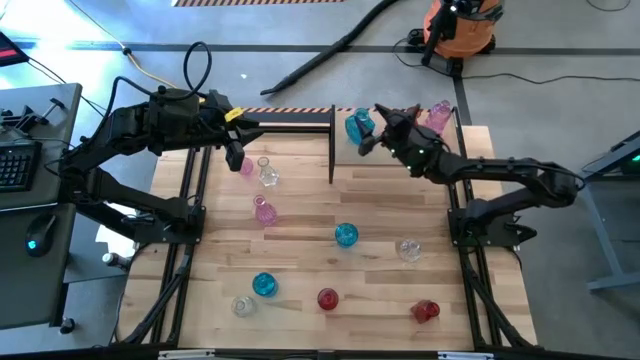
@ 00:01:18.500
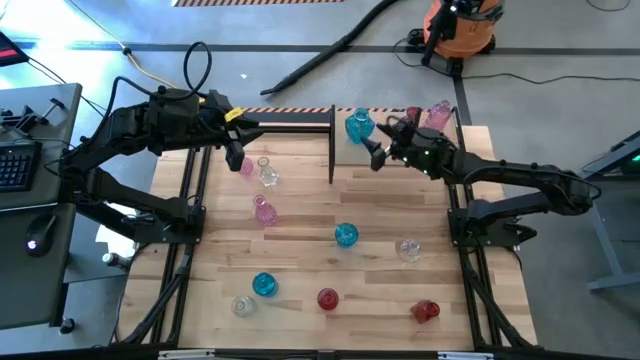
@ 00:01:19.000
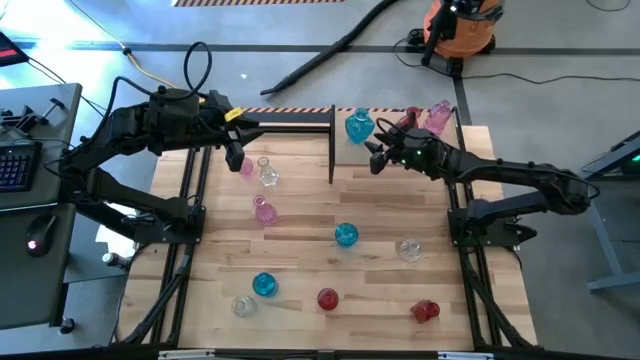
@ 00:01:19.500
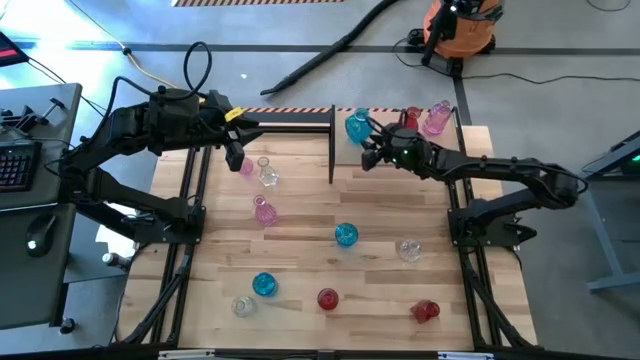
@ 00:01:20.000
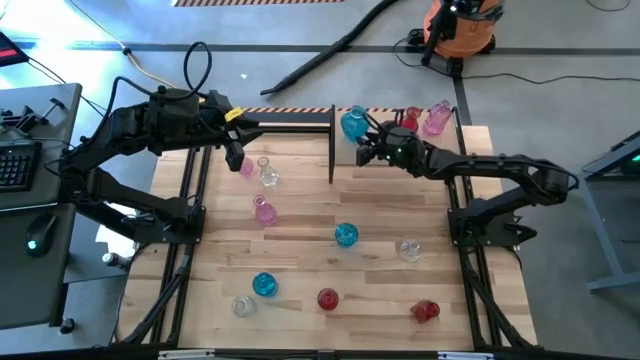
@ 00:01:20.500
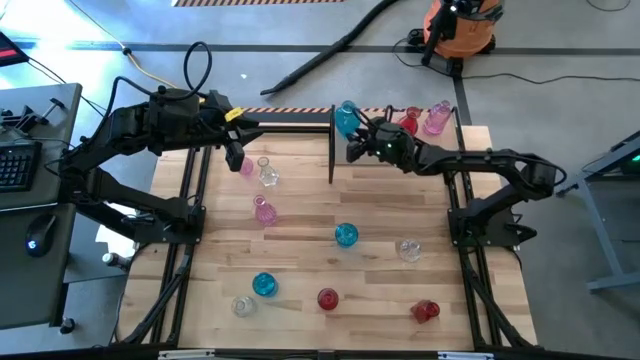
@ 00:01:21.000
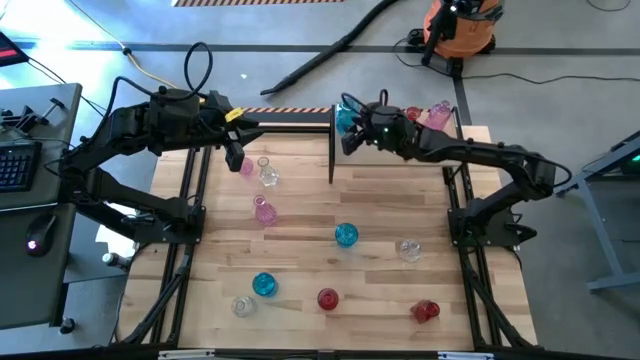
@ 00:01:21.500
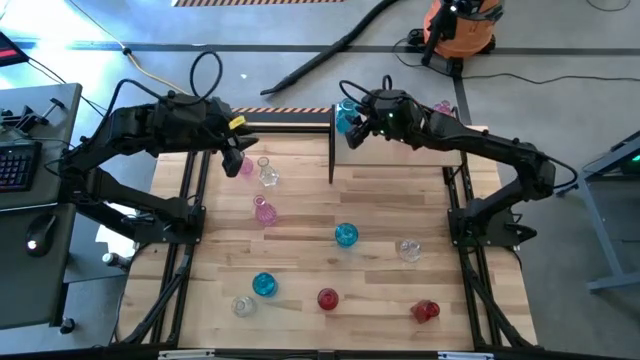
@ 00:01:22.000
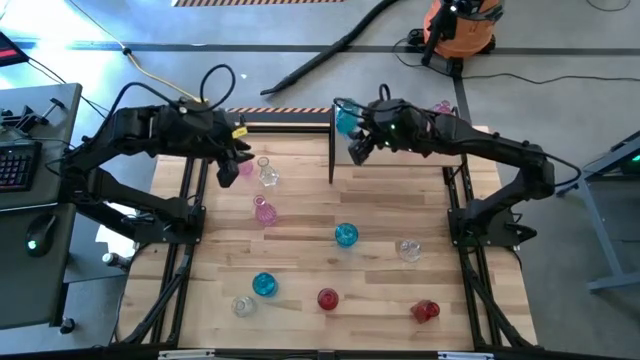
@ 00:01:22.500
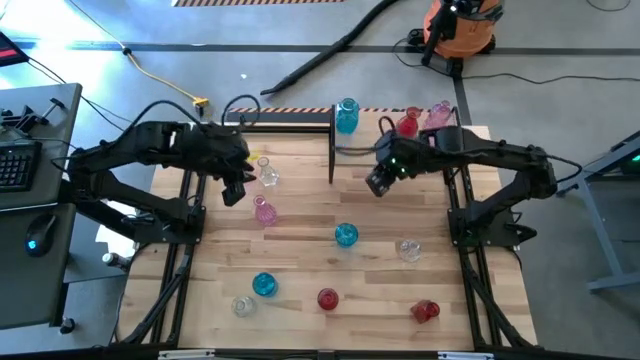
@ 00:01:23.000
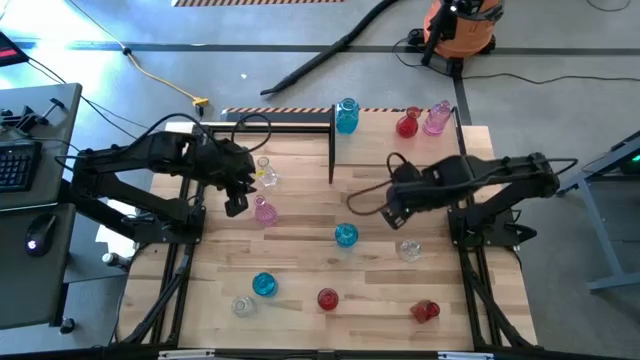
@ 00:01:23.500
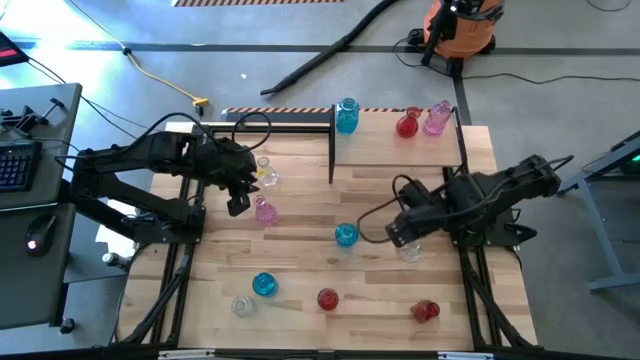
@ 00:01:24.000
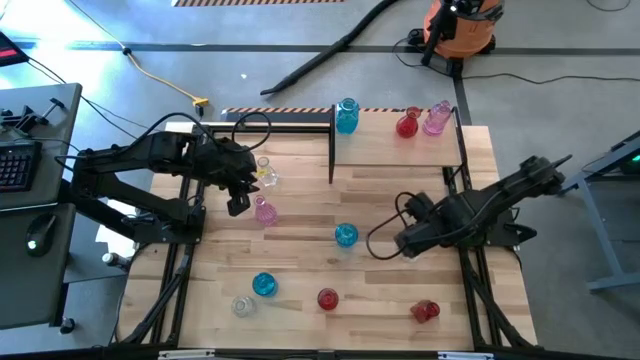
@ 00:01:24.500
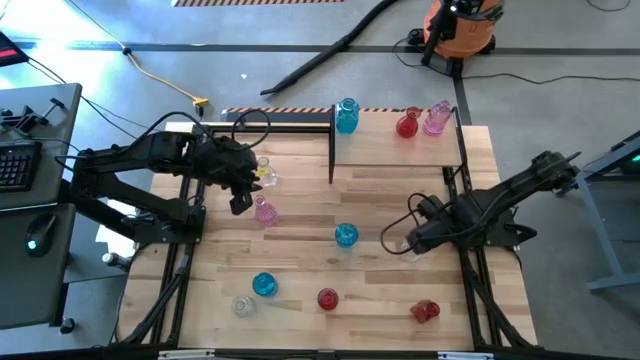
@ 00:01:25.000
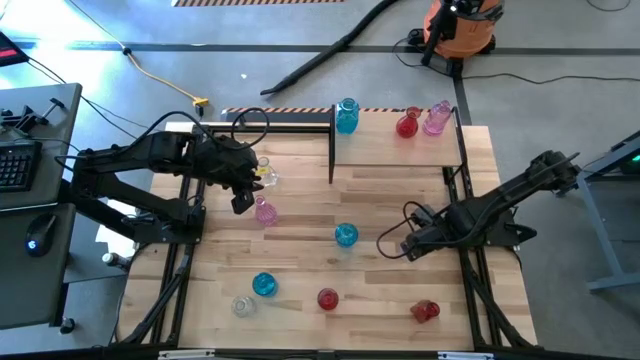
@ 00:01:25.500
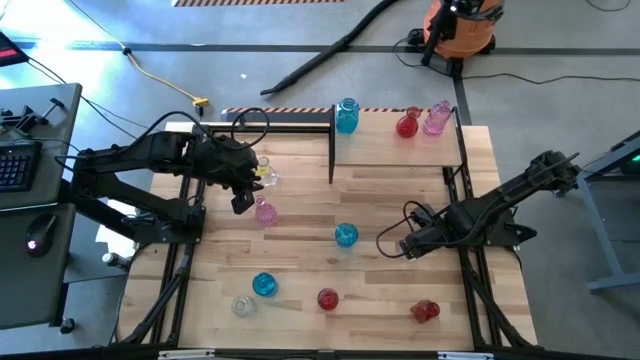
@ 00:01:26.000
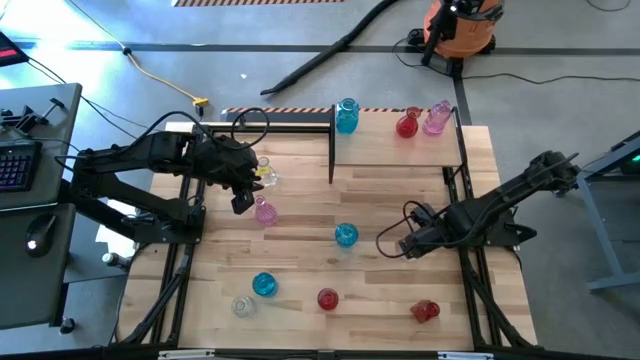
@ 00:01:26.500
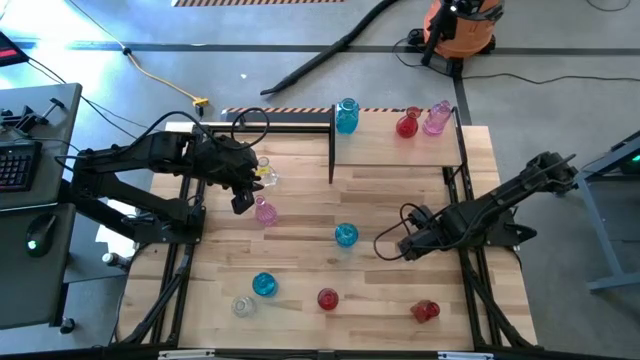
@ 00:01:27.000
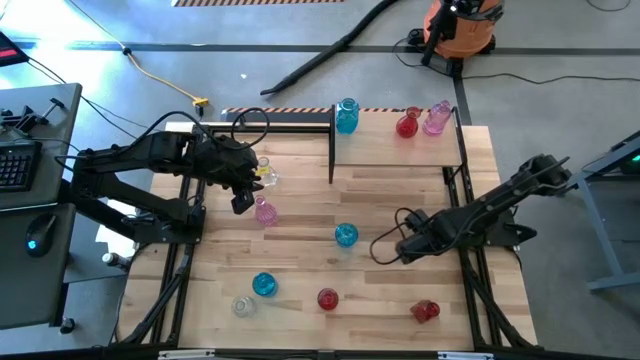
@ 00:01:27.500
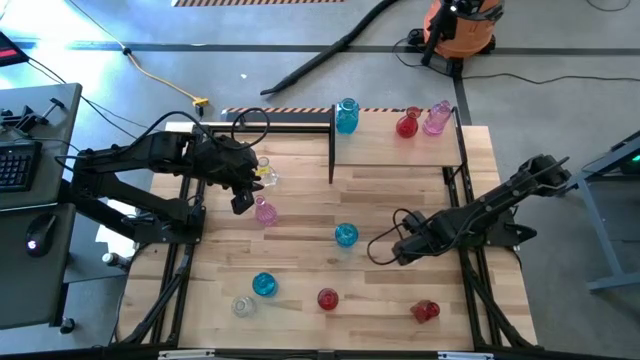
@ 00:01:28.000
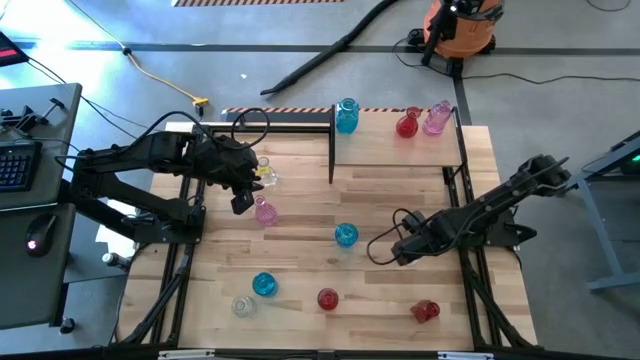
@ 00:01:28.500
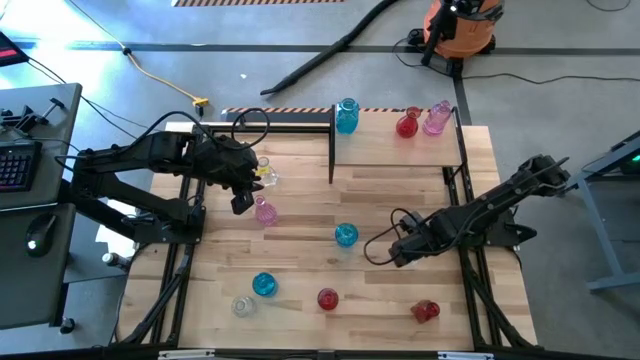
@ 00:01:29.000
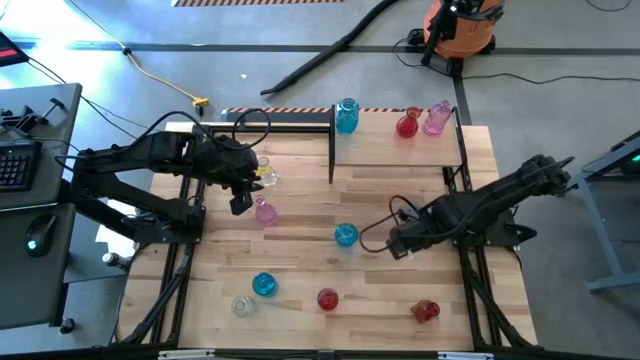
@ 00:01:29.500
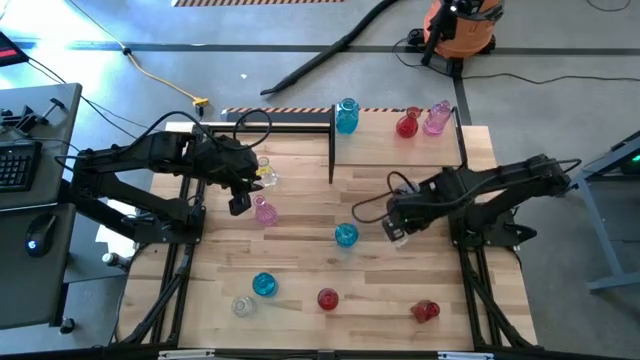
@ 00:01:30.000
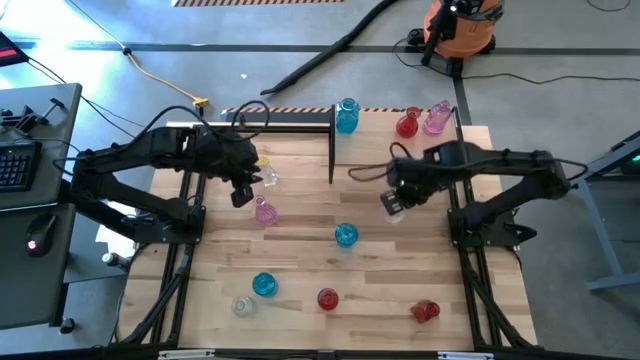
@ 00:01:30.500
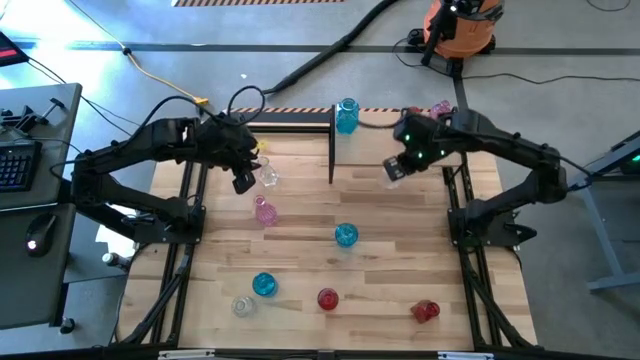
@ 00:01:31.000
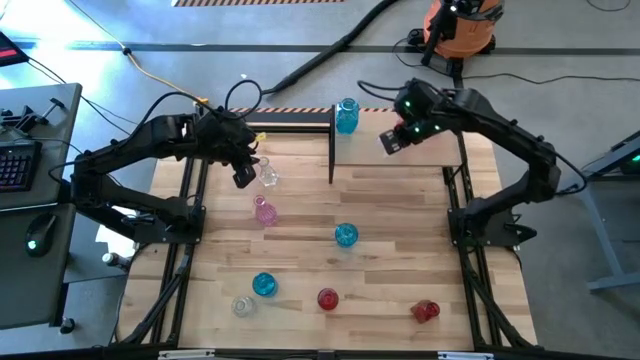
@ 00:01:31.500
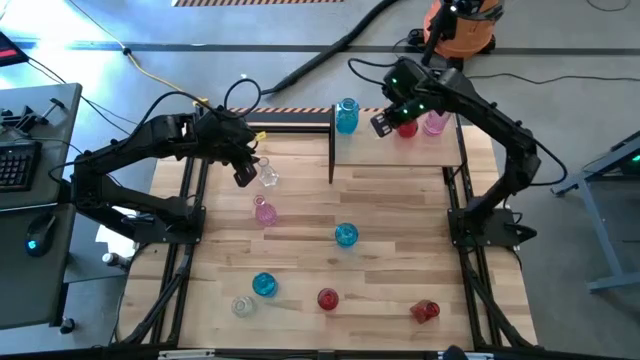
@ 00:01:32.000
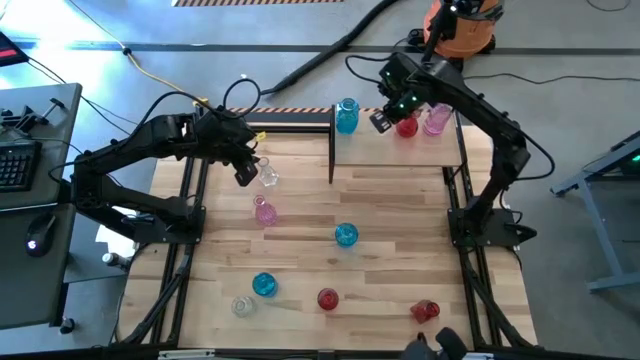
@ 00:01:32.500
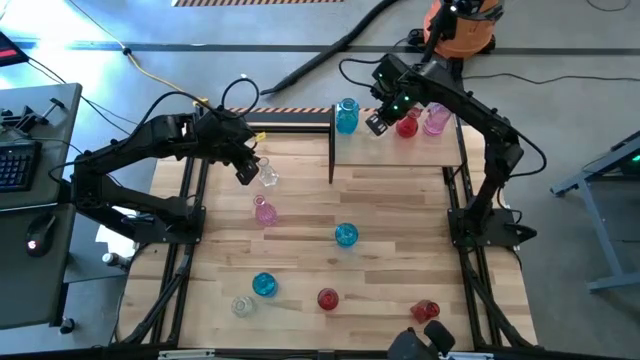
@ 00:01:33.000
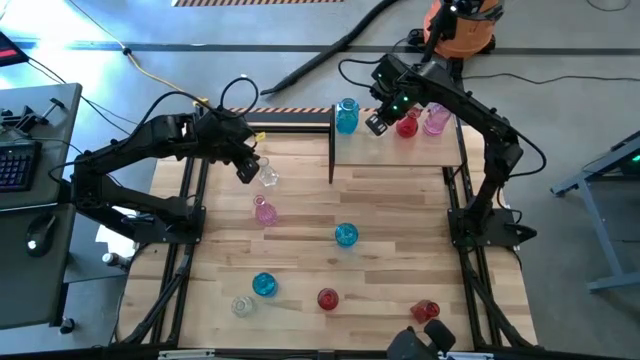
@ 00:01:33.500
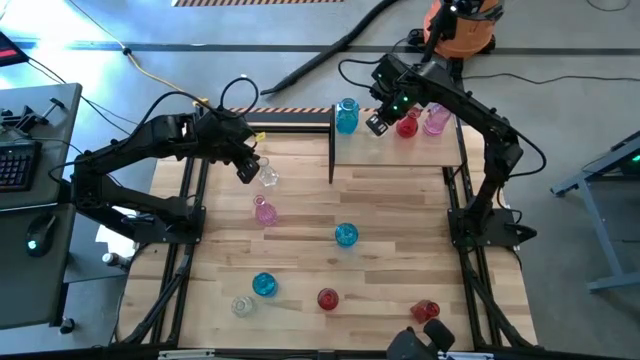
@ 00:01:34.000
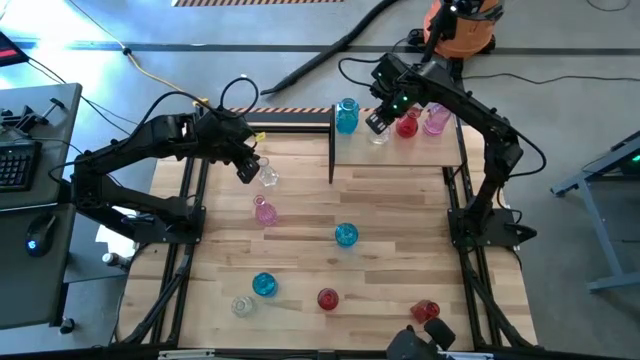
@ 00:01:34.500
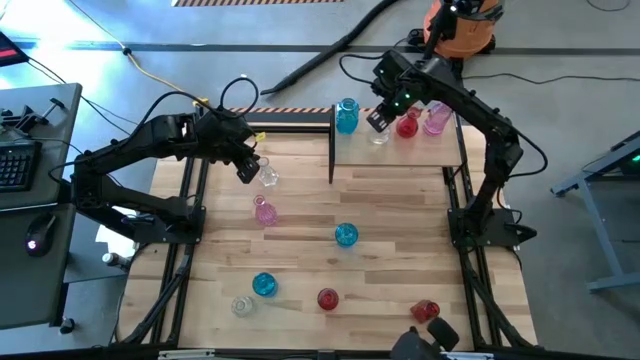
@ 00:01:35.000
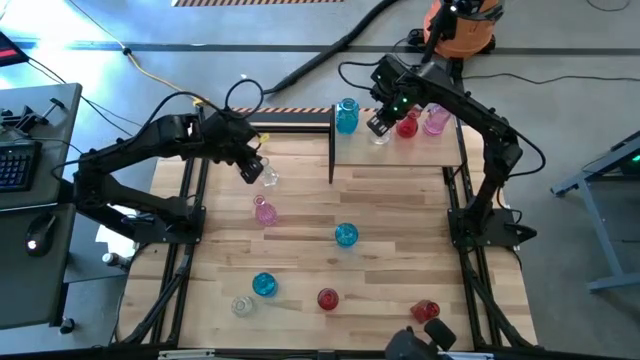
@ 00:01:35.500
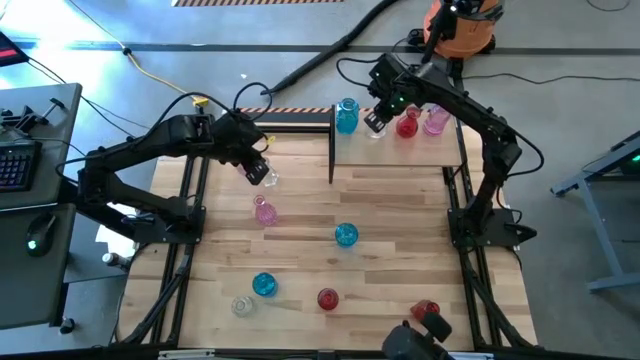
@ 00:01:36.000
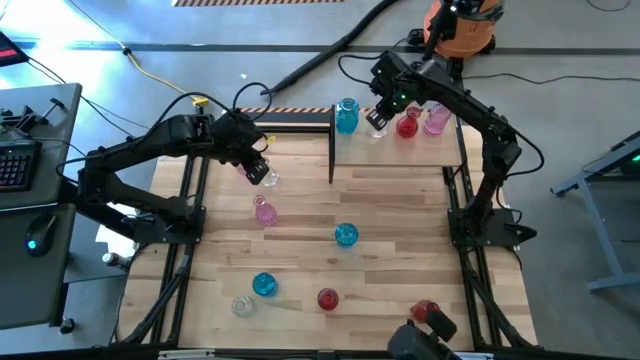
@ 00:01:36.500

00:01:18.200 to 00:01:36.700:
Task: sort vases onto shelf
Put the middle transparent vase on the shelf

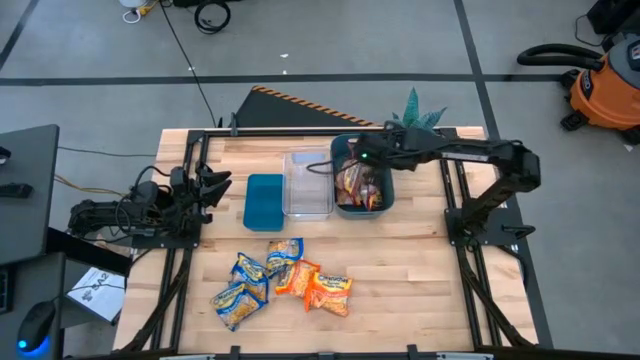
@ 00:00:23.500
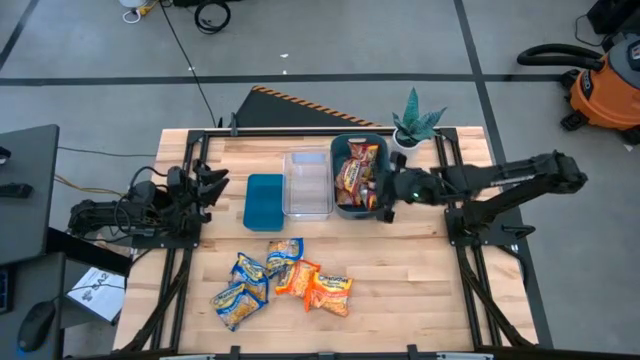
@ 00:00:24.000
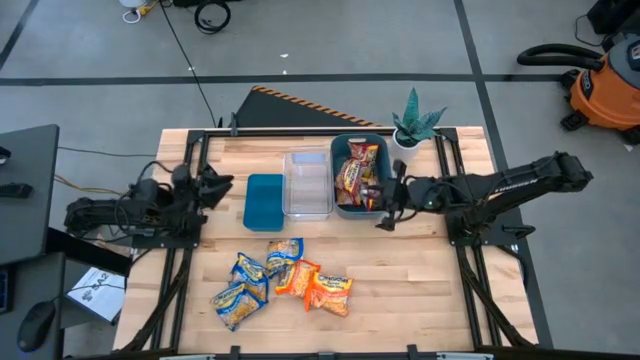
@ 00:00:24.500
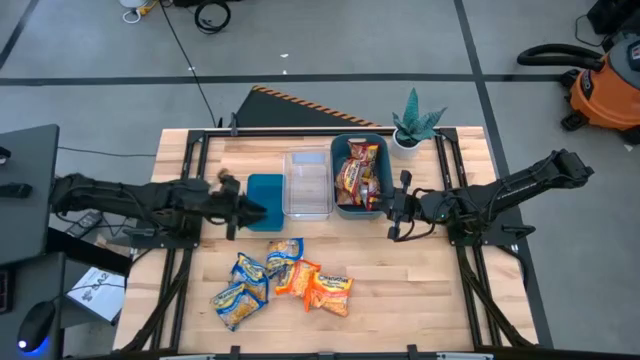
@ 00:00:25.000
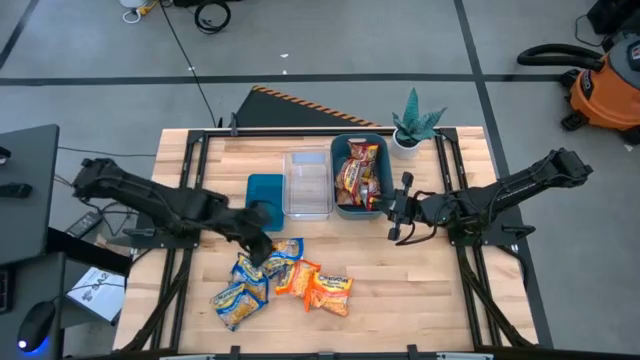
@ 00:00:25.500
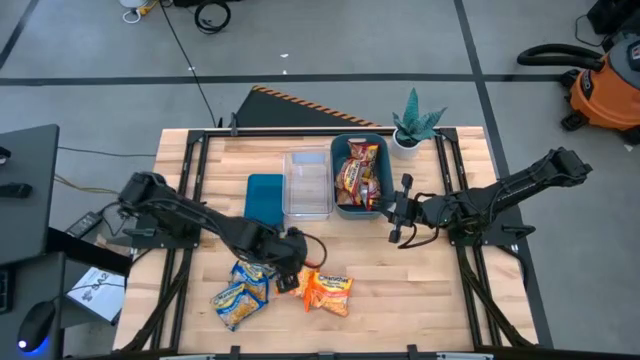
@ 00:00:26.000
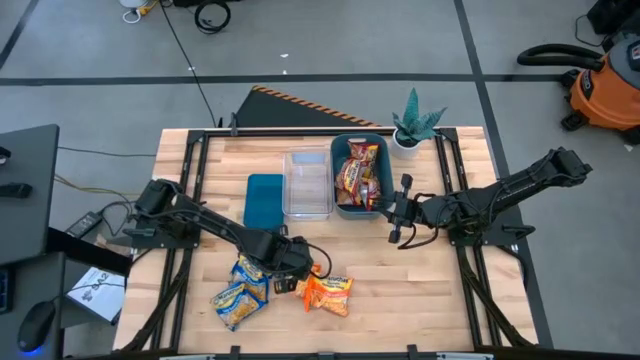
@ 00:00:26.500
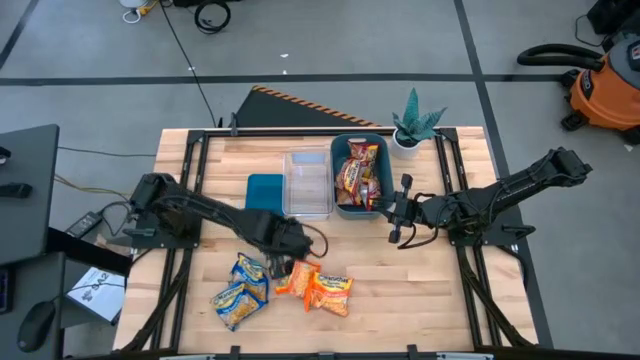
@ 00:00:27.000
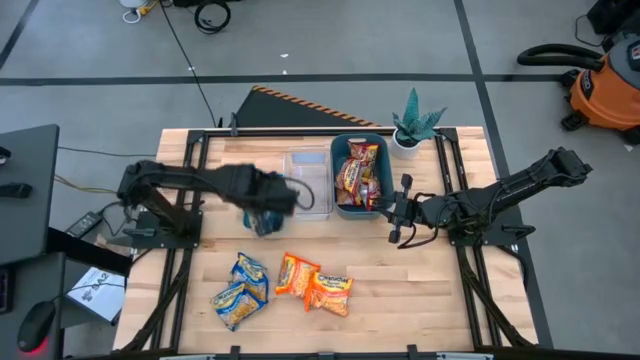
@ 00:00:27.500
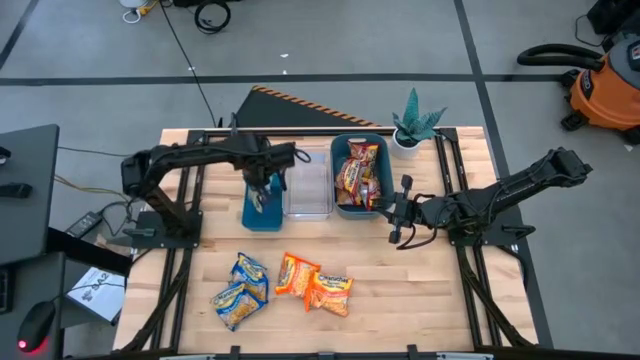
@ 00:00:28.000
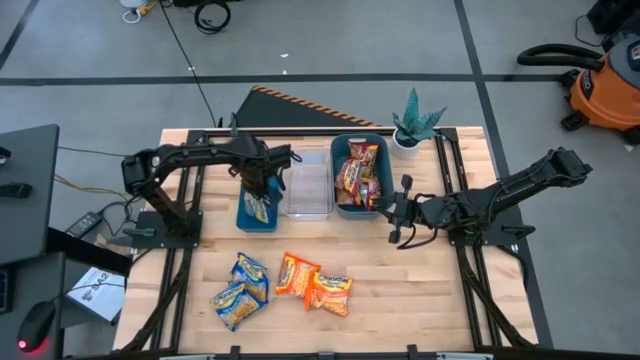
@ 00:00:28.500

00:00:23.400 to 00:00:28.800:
Task: Sort Maruchan noodles
Put the blue noodle pack into the blue bin
